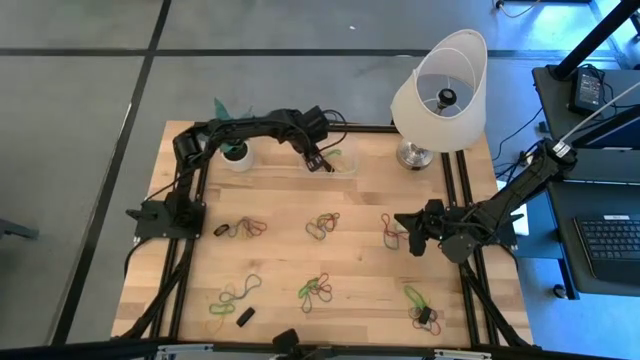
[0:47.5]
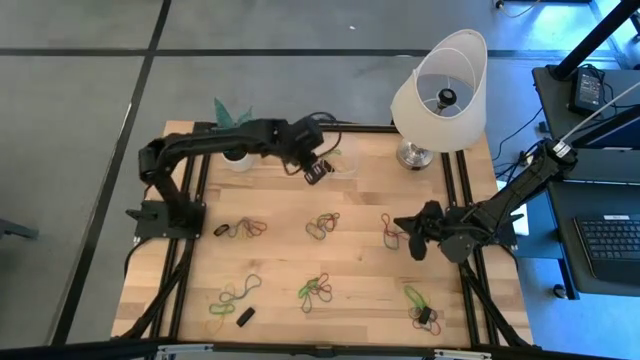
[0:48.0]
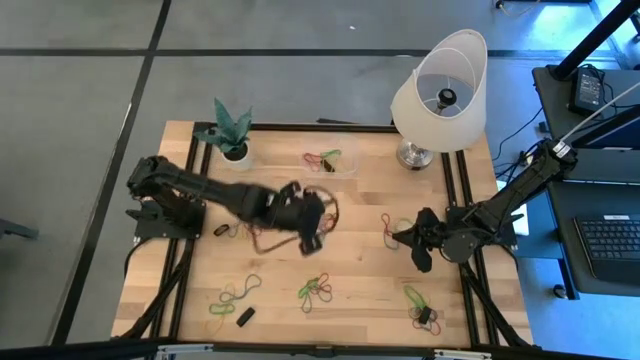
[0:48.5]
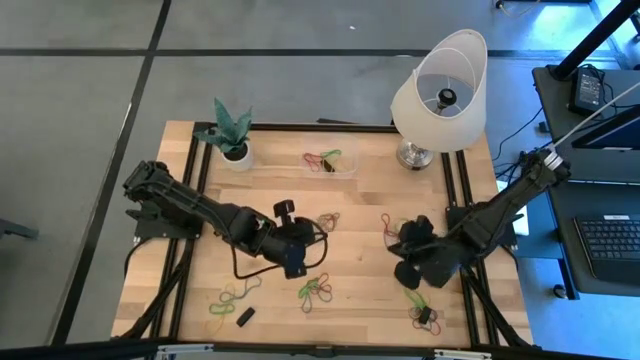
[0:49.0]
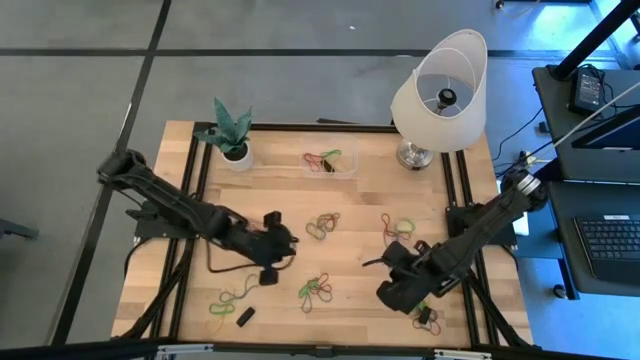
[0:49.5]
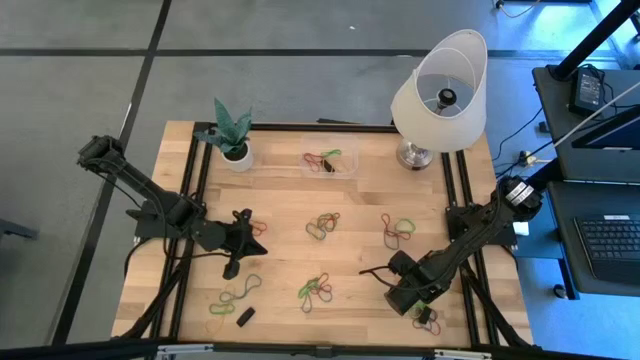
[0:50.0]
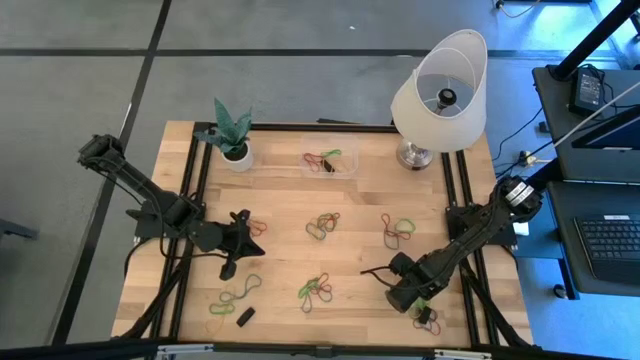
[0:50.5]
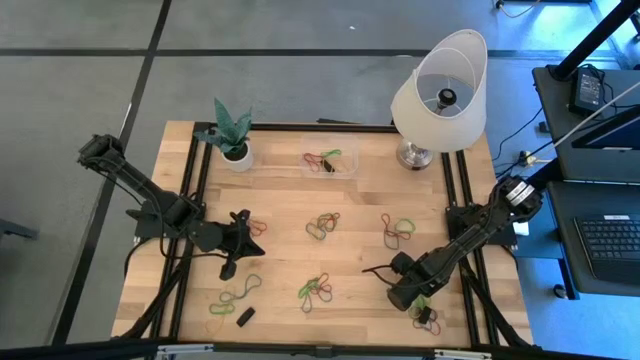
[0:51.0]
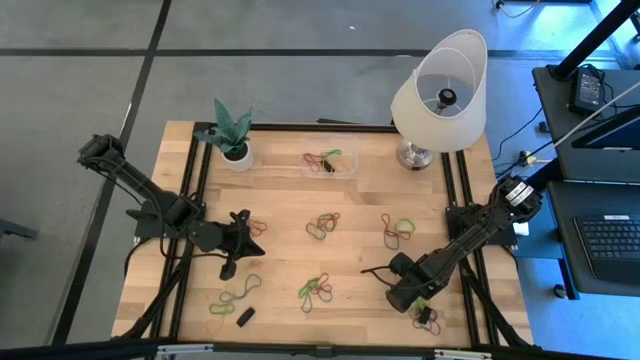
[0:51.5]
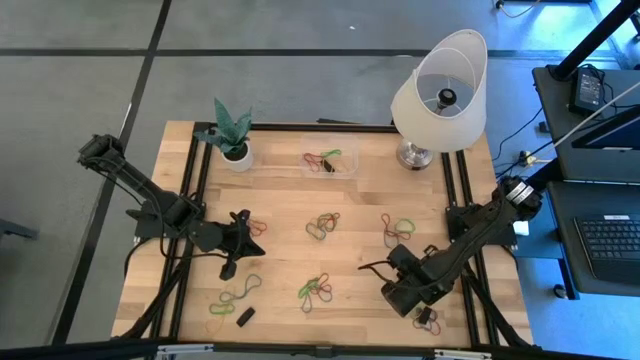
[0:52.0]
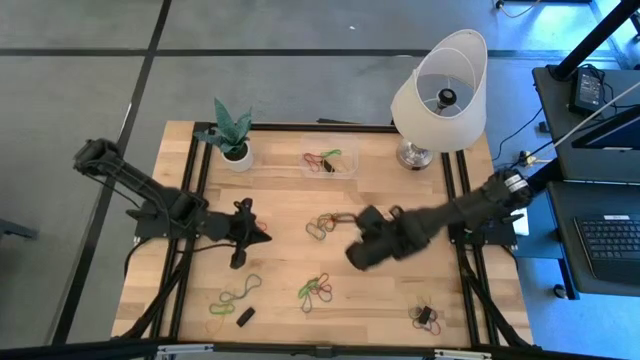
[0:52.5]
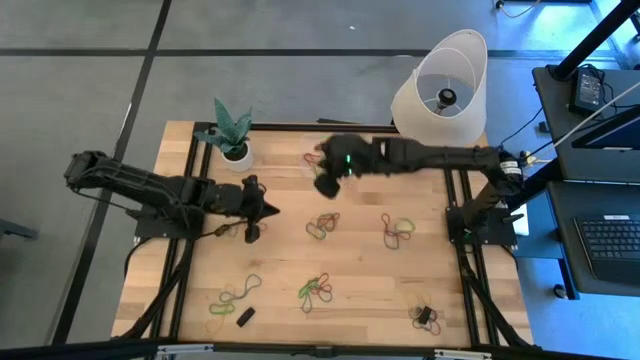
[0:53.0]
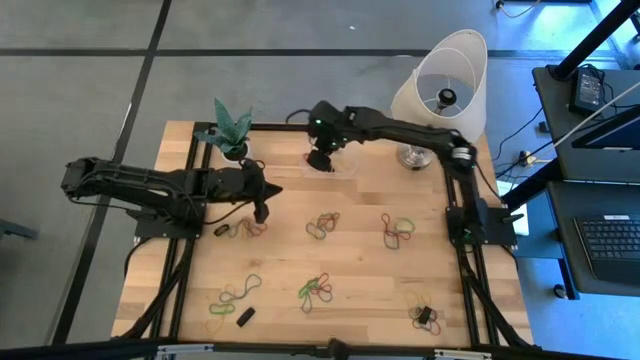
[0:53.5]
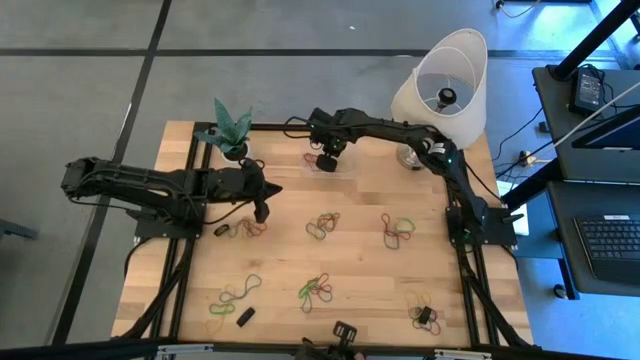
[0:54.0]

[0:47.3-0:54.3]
Task: Pick and place rubber bands into bin
Put the green rubber band into the transparent bin

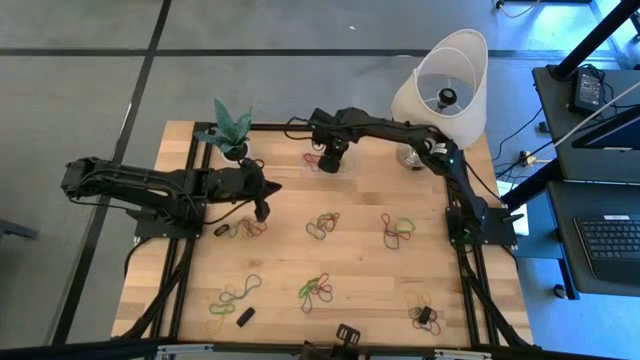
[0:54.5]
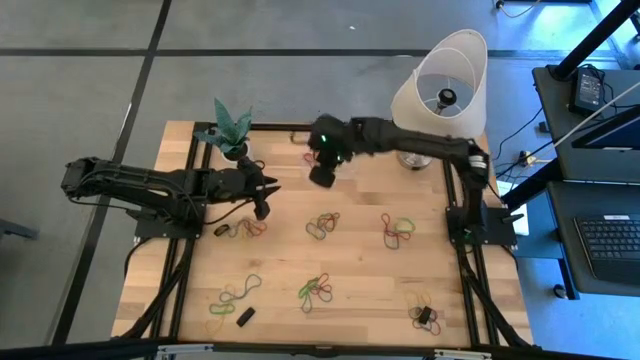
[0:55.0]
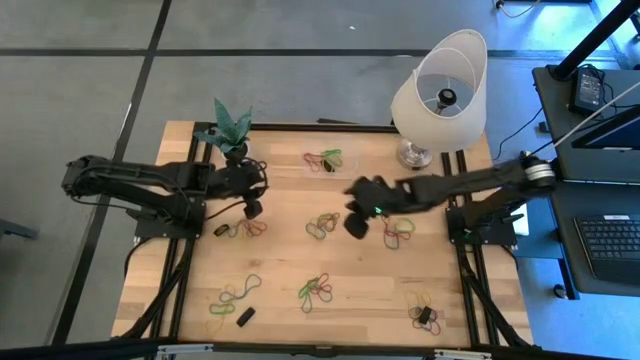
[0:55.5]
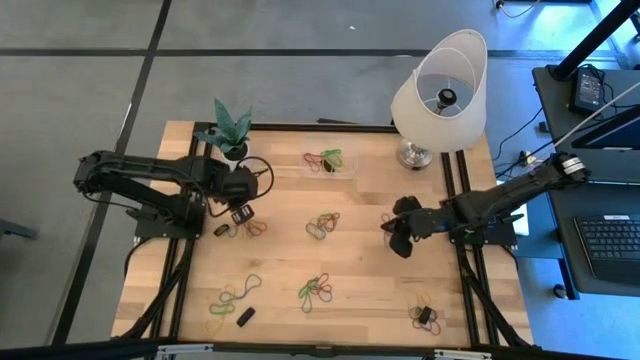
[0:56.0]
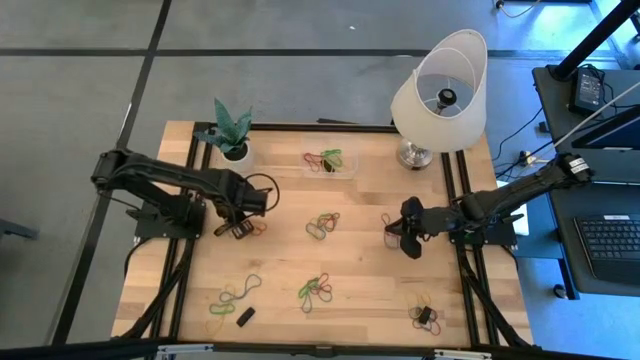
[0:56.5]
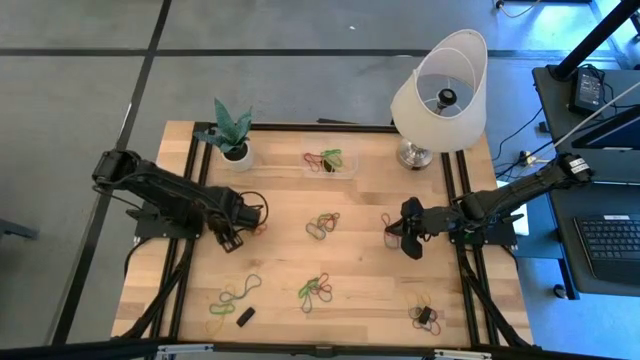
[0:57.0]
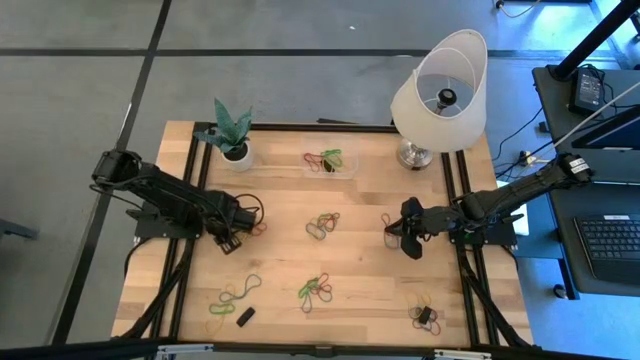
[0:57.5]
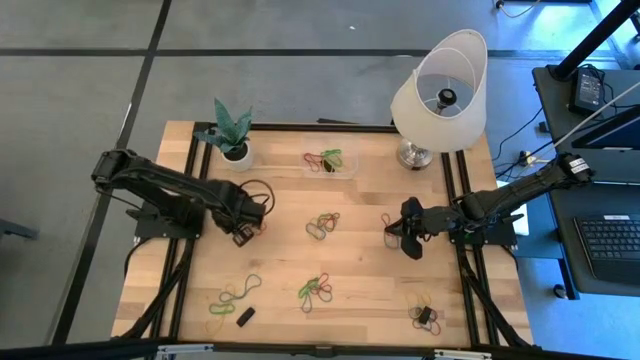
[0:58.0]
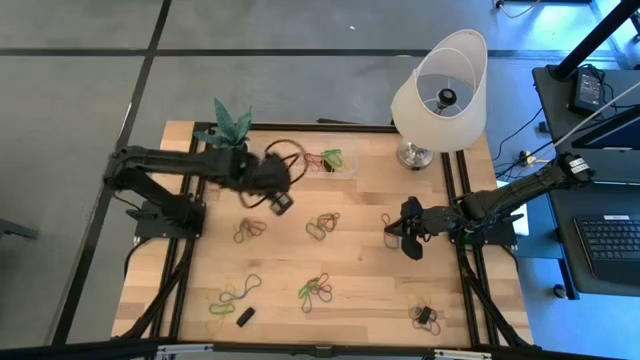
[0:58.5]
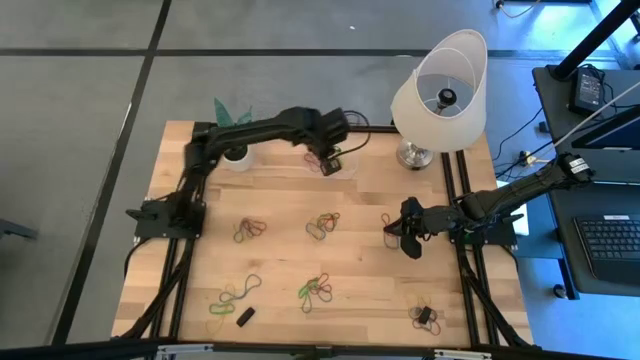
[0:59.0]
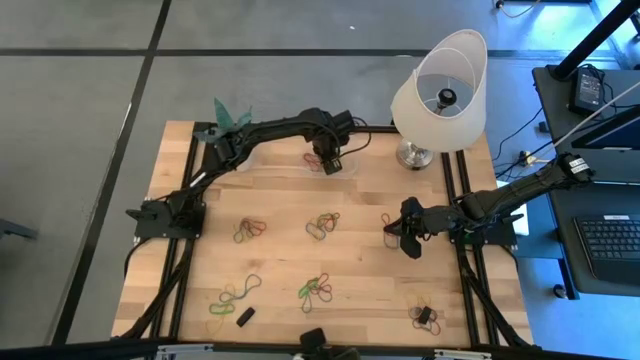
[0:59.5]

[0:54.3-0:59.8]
Put the black rubber band into the transparent bin

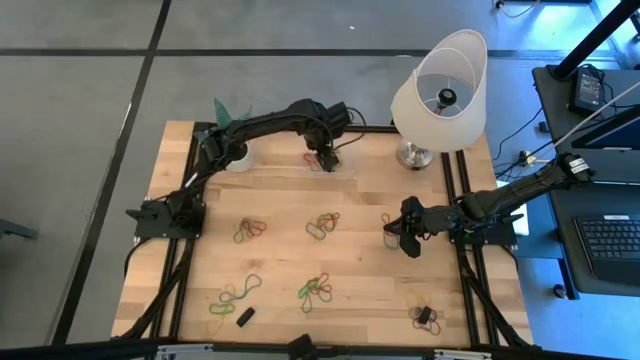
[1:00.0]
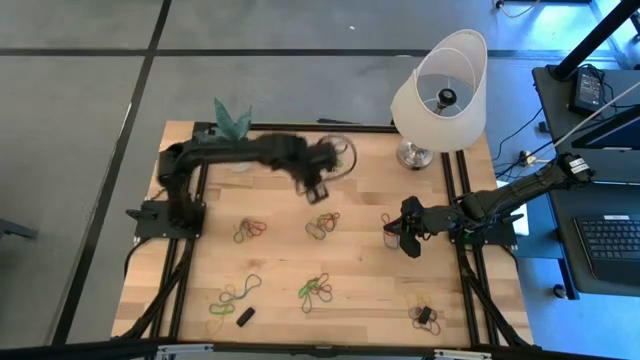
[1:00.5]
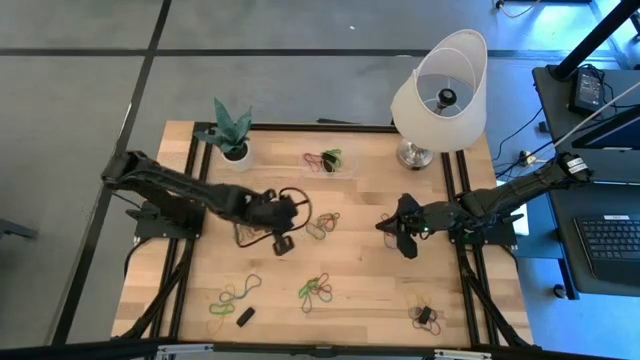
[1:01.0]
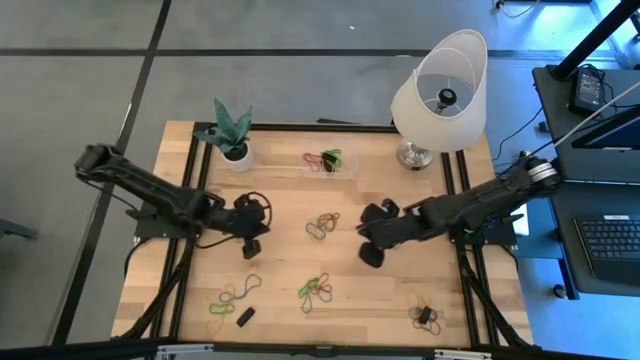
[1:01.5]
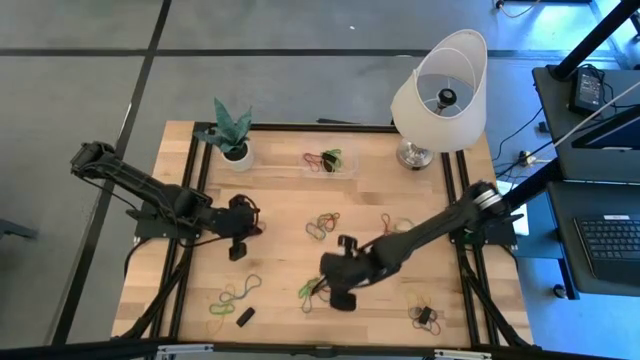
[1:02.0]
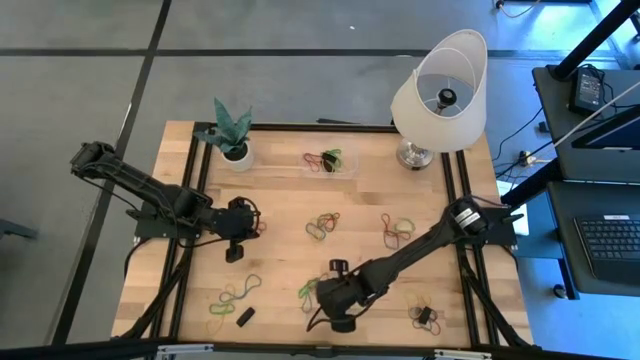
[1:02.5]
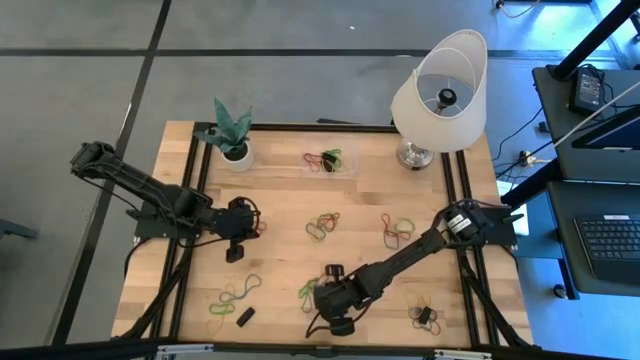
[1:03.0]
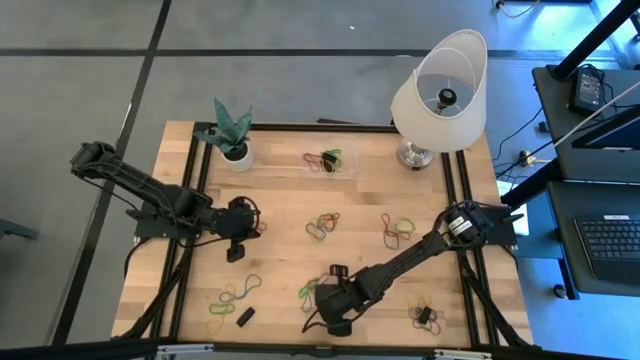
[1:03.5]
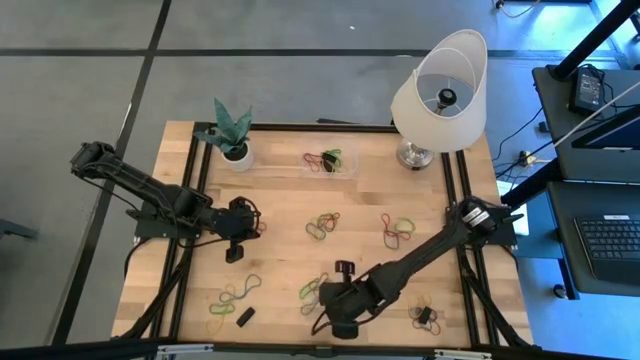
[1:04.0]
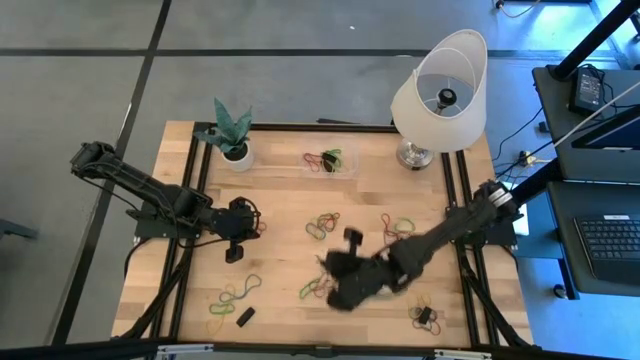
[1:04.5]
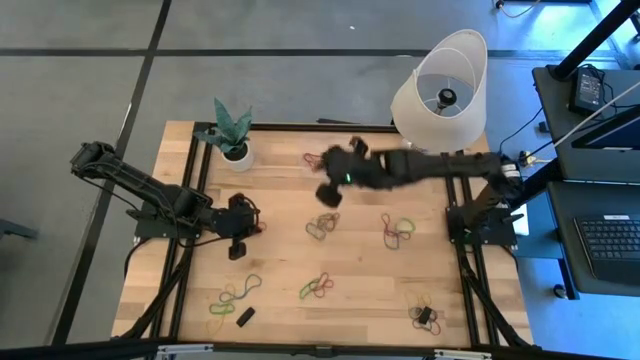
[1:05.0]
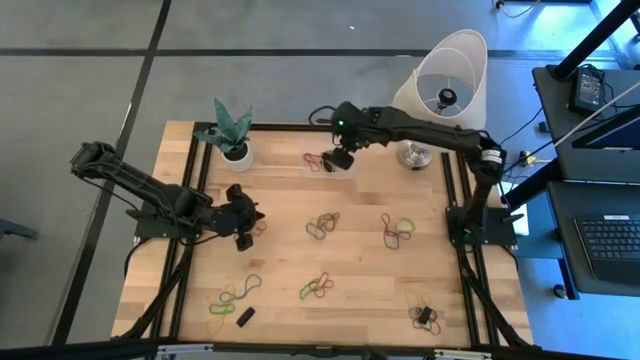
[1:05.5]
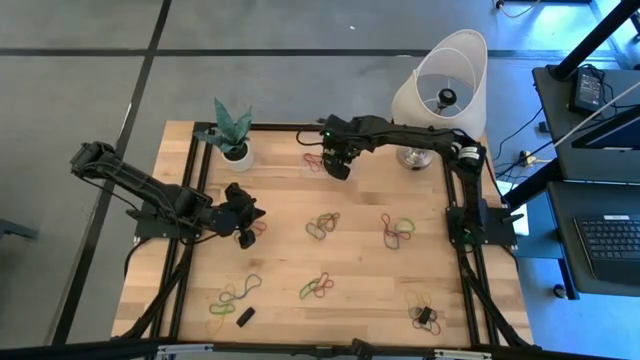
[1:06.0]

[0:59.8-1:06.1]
Put the blue rubber band into the transparent bin

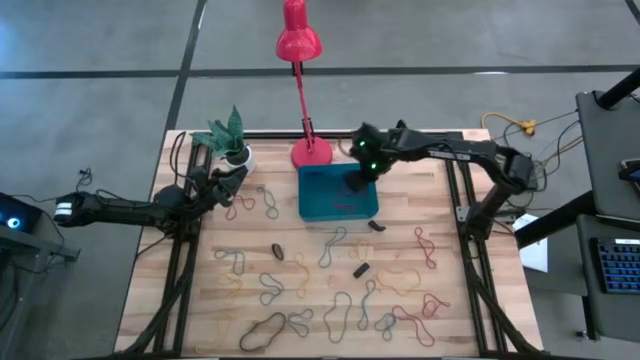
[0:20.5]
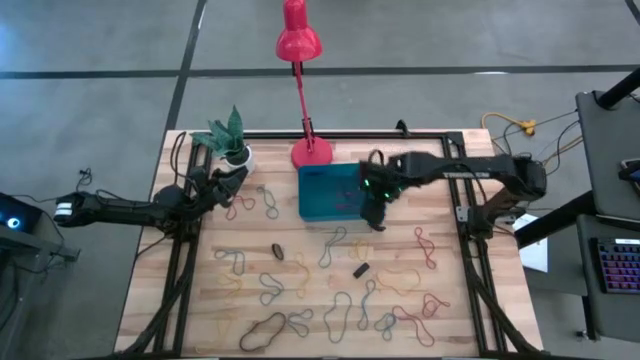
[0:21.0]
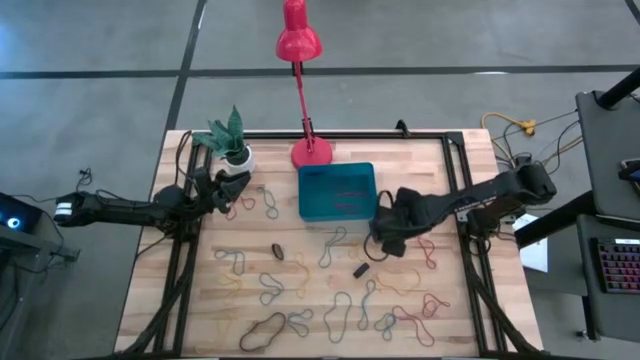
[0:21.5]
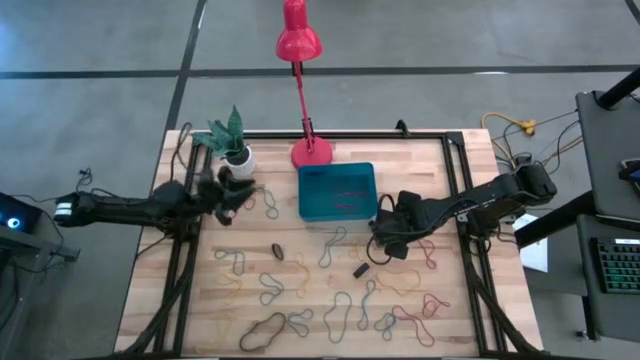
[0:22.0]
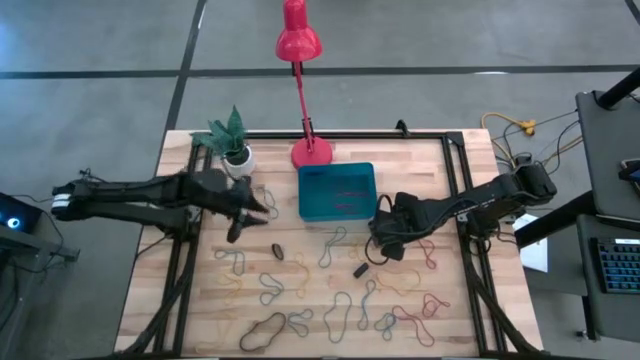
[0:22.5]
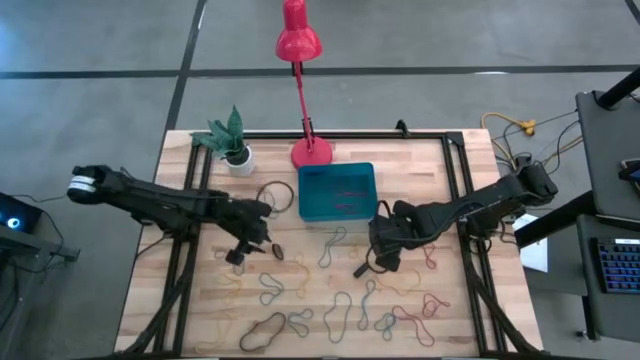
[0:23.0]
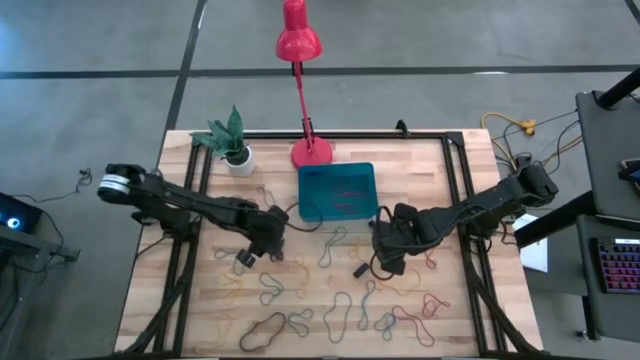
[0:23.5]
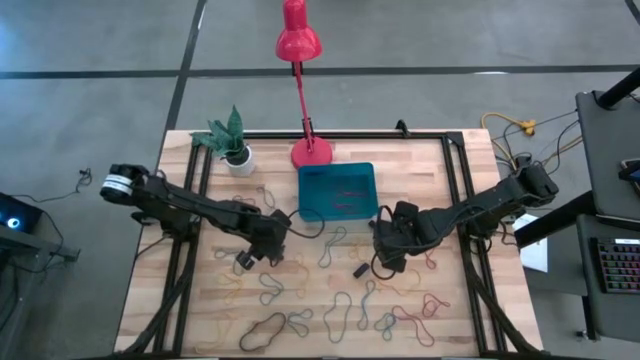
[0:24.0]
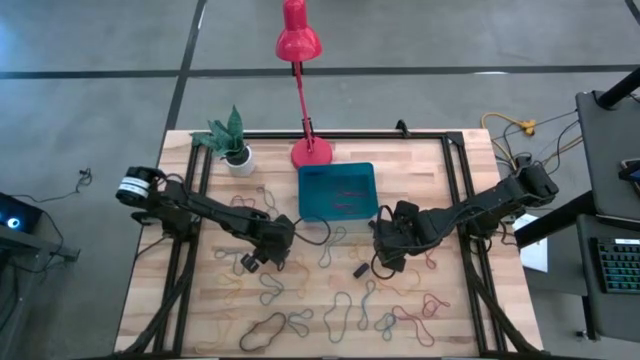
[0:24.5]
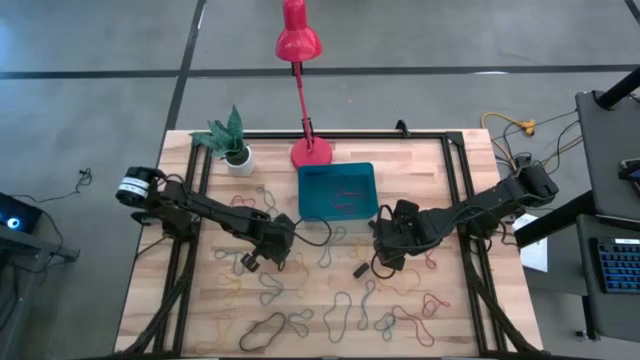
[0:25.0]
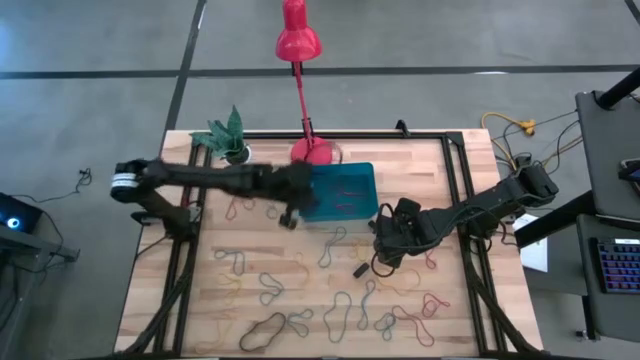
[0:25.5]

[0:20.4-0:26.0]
Task: Pick and place rubber bands into bin
Put the black rubber band into the blue bin
